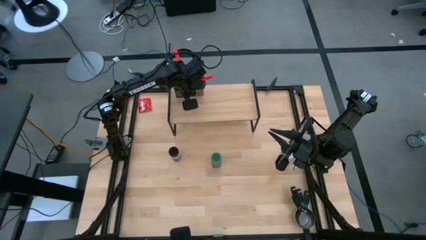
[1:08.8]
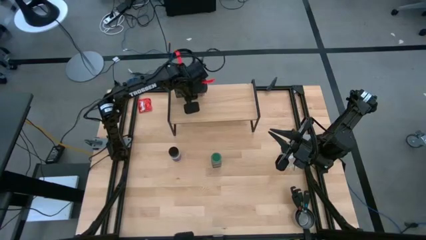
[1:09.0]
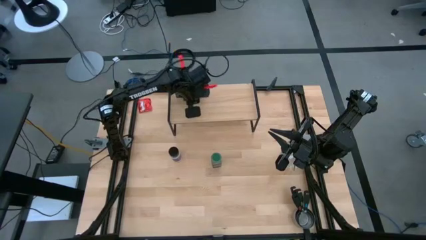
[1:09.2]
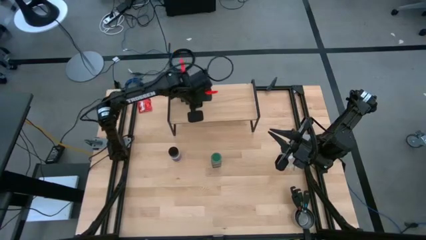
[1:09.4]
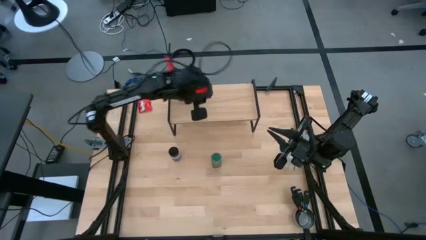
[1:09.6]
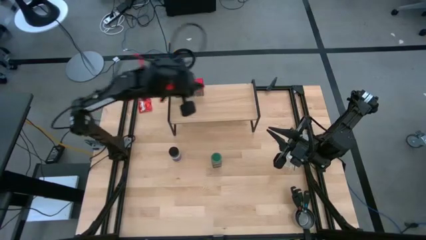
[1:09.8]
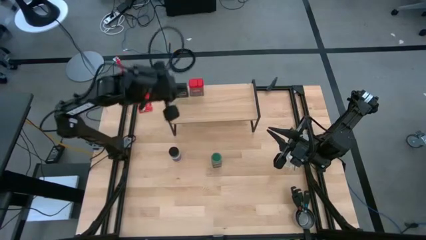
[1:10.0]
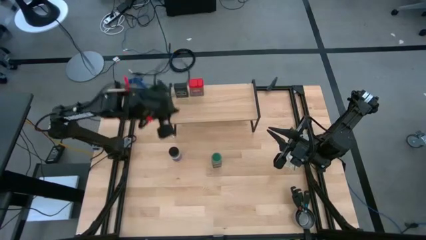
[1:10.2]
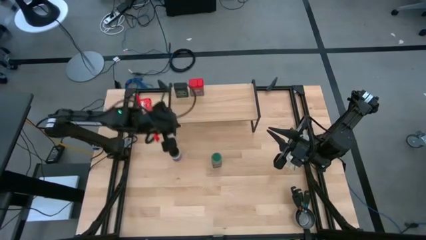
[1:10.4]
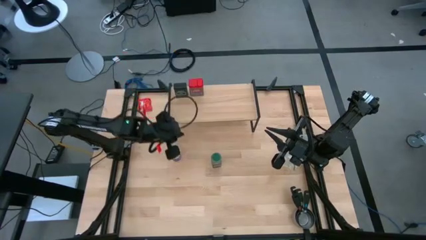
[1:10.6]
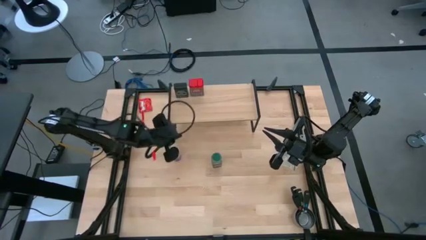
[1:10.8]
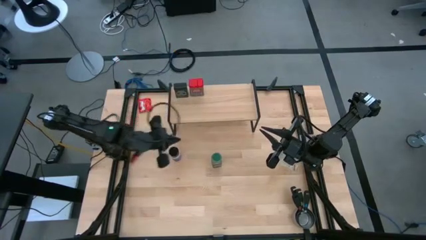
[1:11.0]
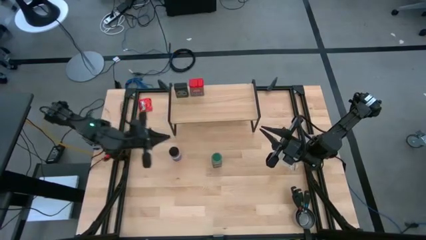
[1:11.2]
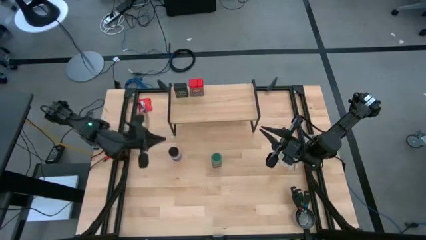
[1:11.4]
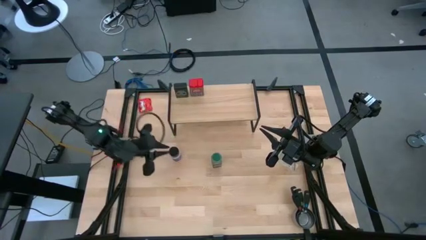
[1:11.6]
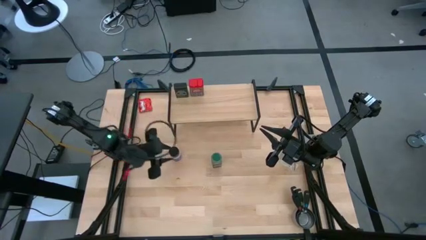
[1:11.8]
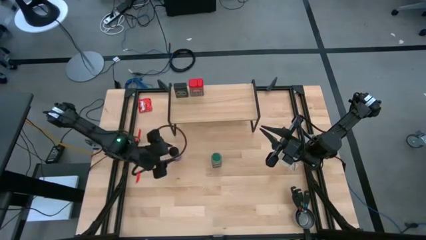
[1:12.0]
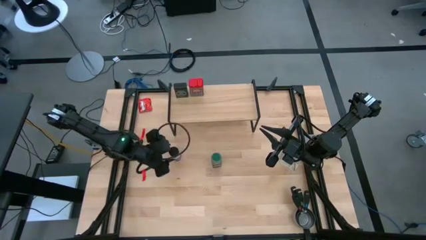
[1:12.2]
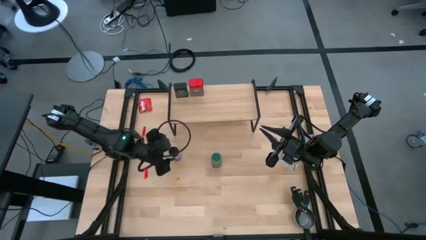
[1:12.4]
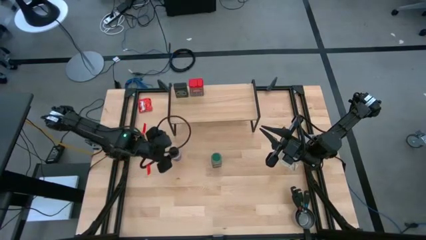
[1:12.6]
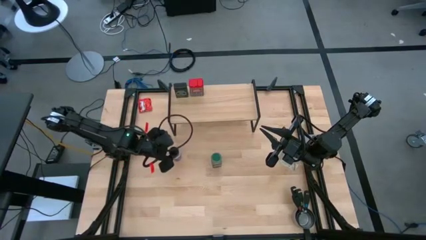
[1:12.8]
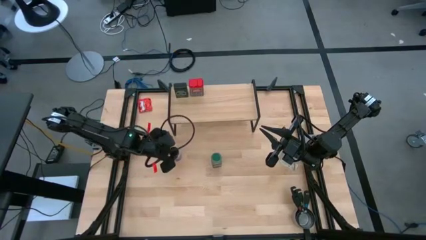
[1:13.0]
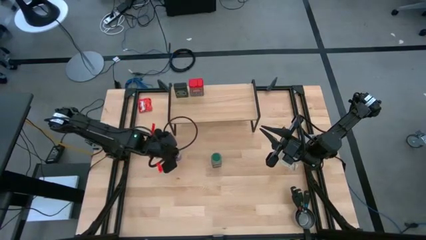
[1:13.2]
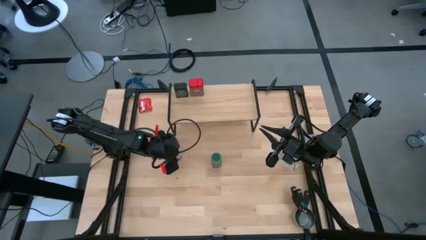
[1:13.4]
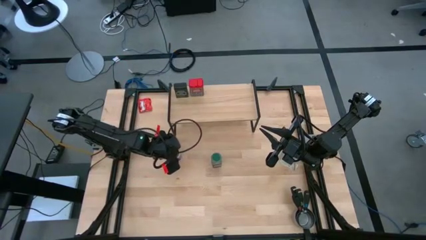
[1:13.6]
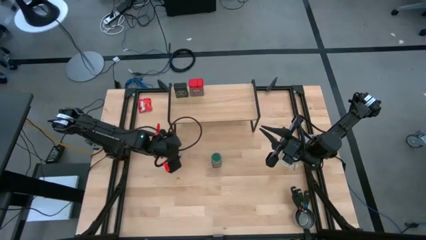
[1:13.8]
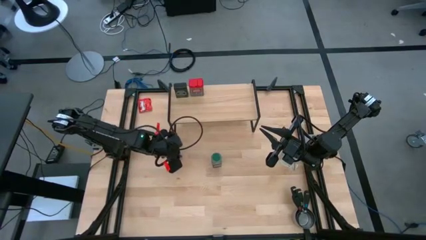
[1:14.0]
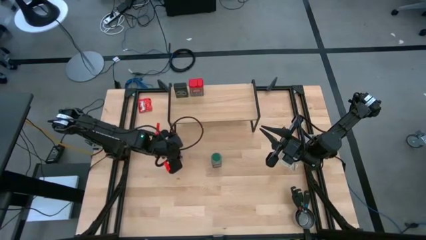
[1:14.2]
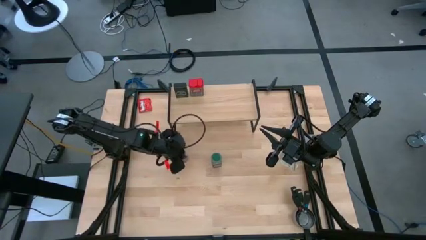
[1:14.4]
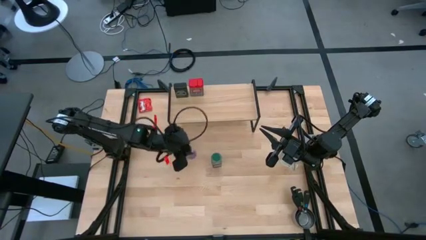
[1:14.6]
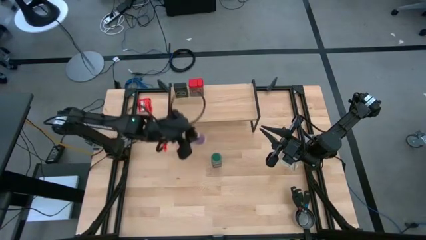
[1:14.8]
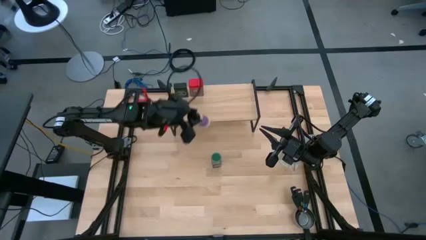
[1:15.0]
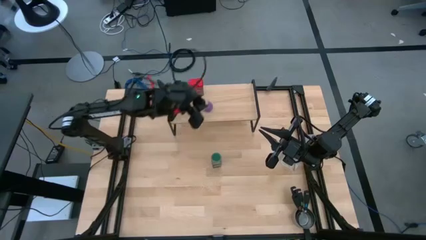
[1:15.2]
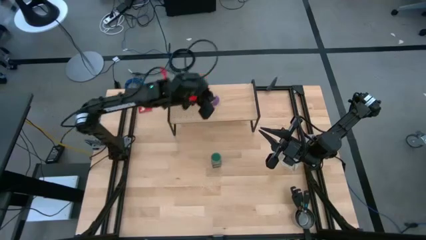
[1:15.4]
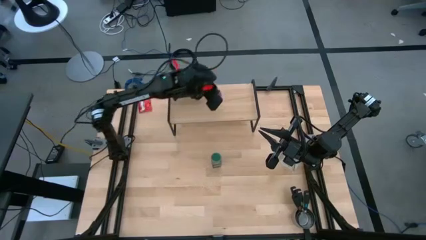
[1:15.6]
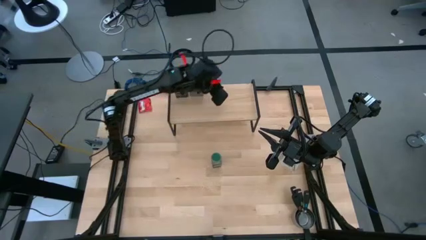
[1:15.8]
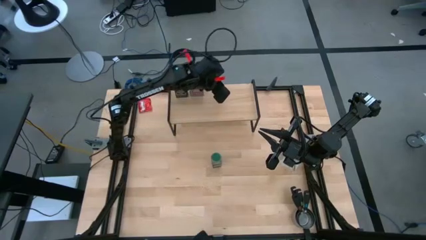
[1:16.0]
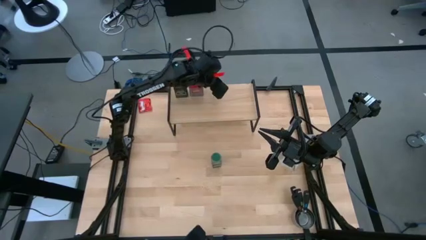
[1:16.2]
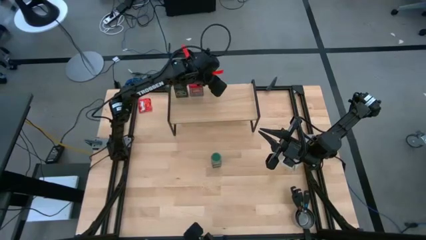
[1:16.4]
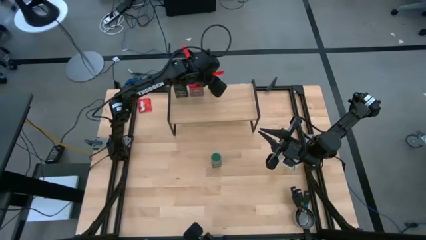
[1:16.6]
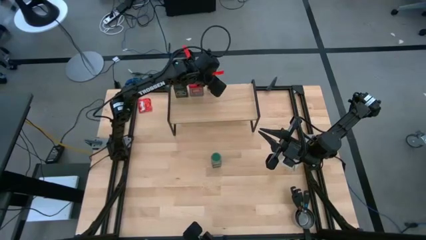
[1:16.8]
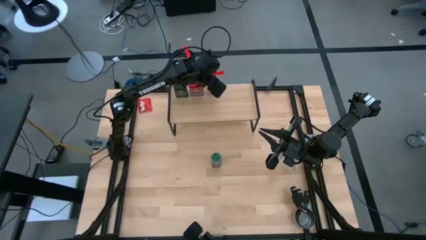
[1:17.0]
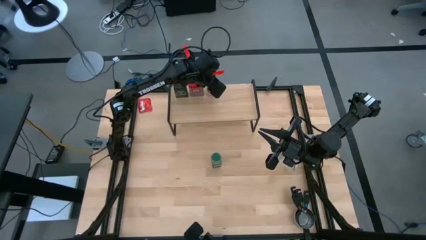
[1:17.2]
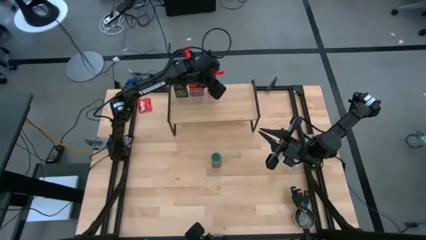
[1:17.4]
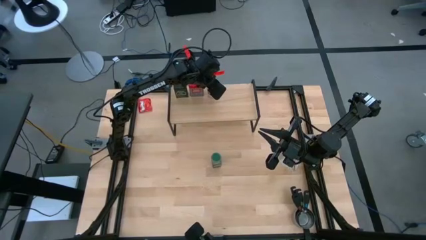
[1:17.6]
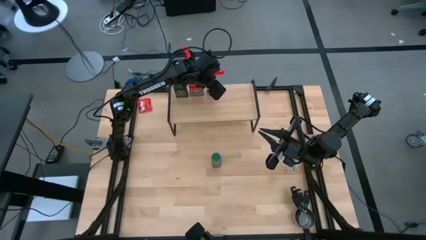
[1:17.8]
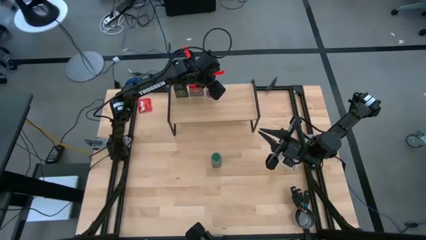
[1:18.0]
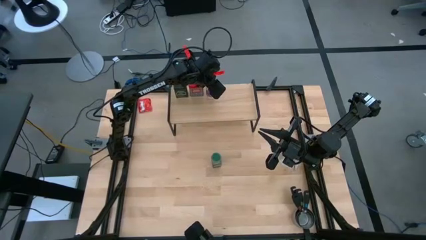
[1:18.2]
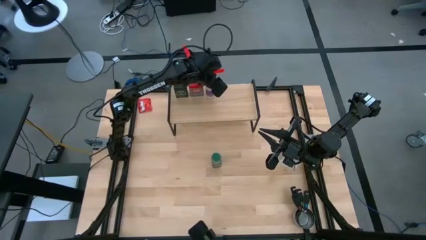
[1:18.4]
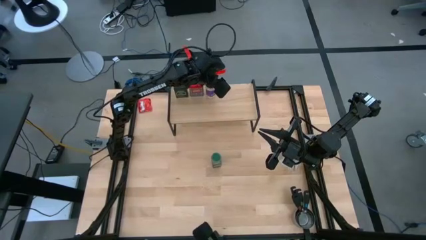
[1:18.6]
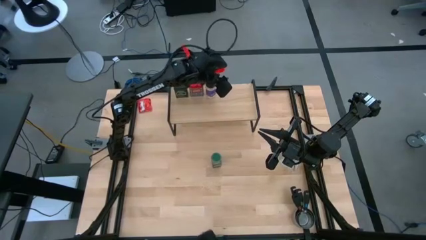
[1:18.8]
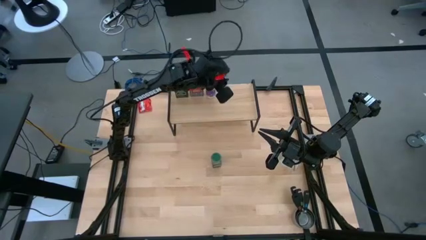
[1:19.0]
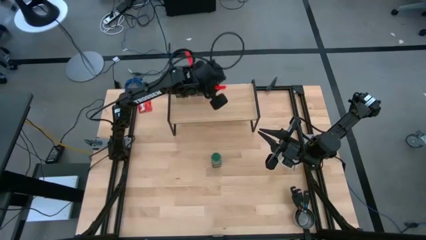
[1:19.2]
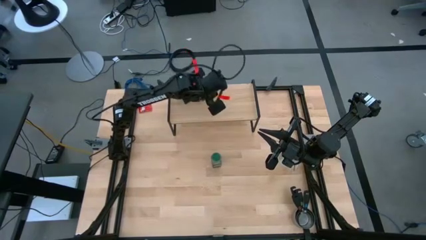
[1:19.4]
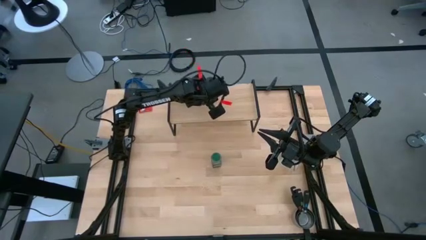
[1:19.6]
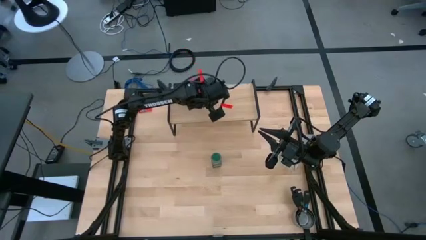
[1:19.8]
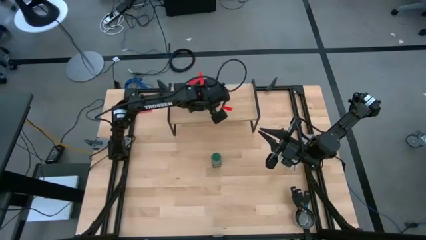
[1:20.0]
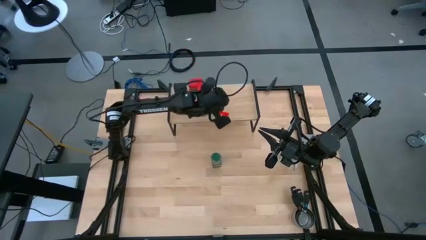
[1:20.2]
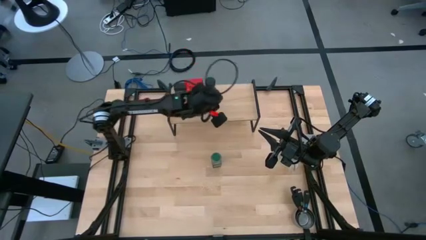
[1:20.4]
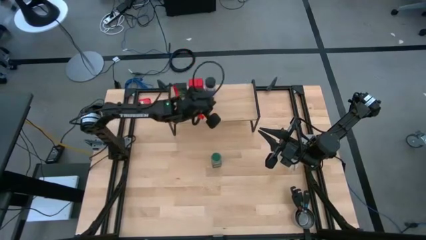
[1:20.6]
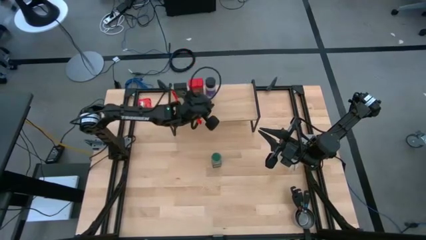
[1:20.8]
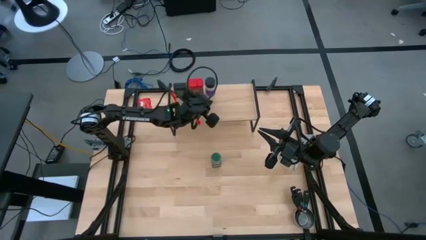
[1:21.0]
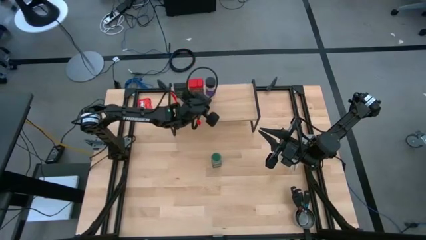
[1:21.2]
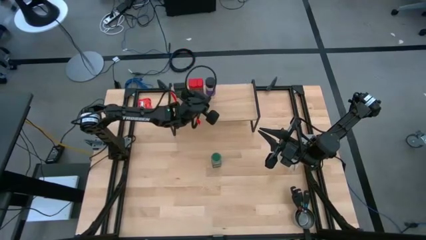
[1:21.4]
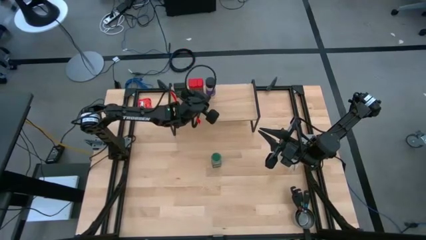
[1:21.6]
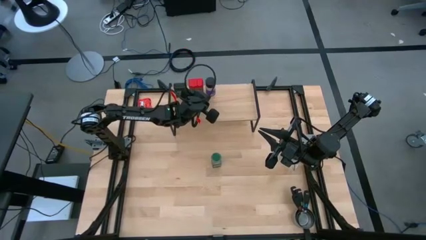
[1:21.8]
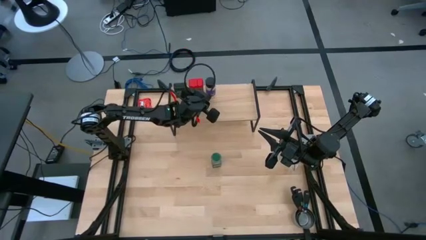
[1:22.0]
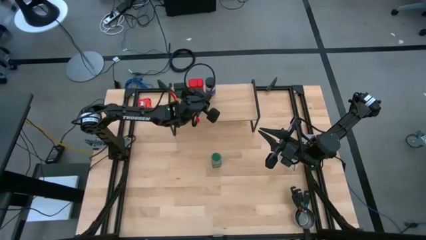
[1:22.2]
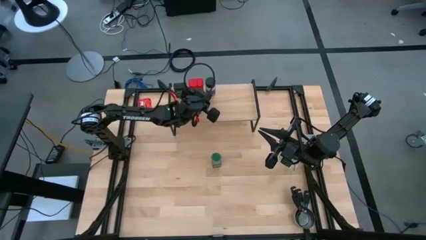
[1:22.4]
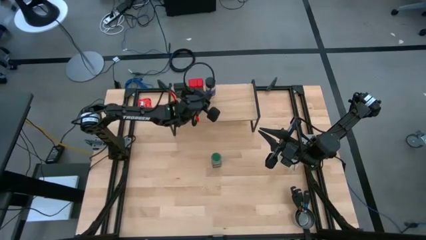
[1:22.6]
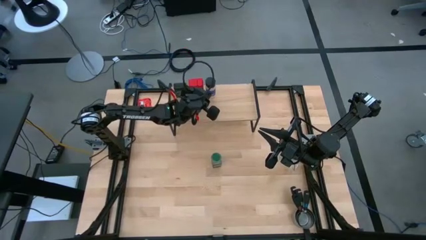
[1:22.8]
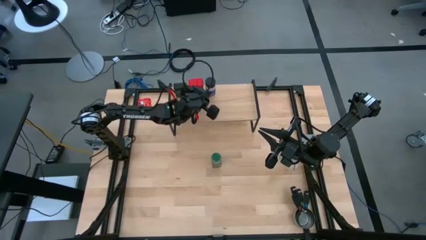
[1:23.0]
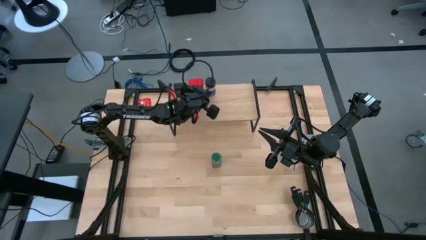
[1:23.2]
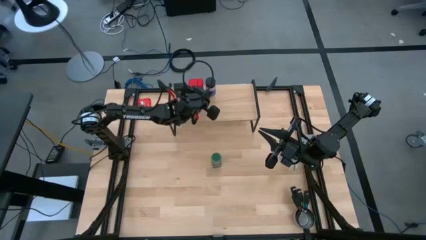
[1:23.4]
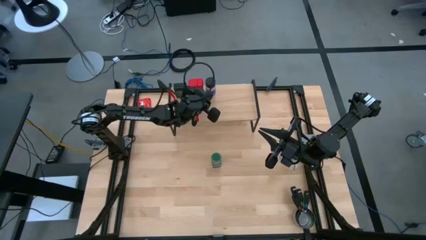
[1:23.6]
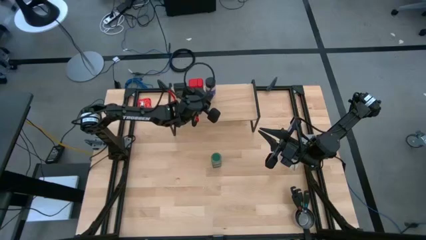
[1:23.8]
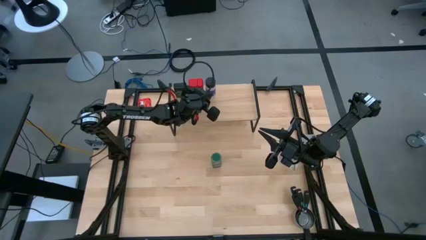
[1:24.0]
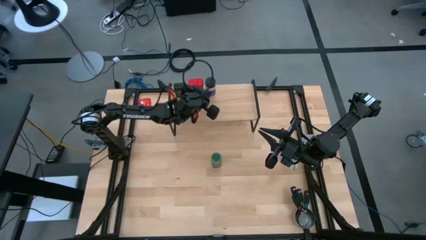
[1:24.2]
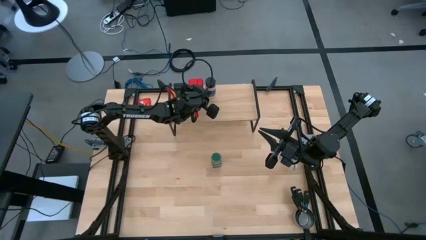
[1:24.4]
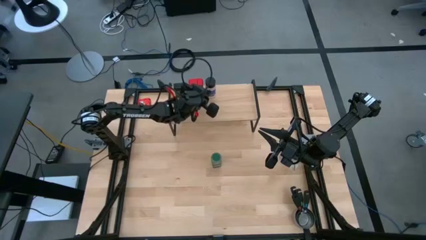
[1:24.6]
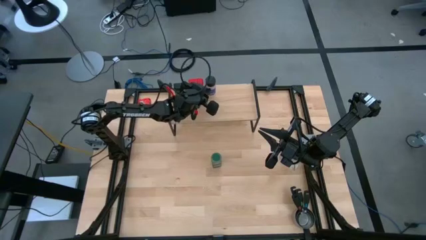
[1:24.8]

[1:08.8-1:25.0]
Task: Shelf spices
Put the black seasoning bottle on the shelf
